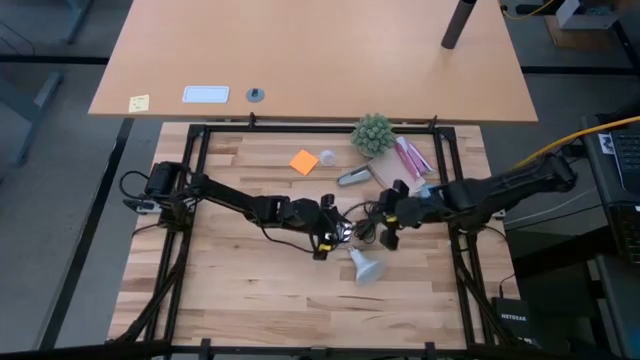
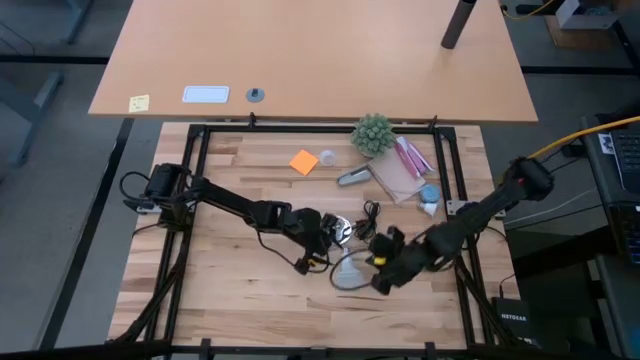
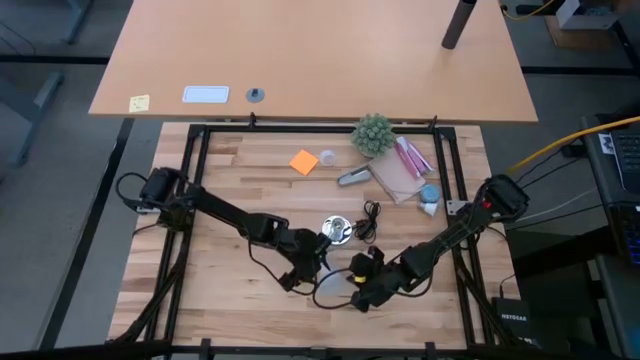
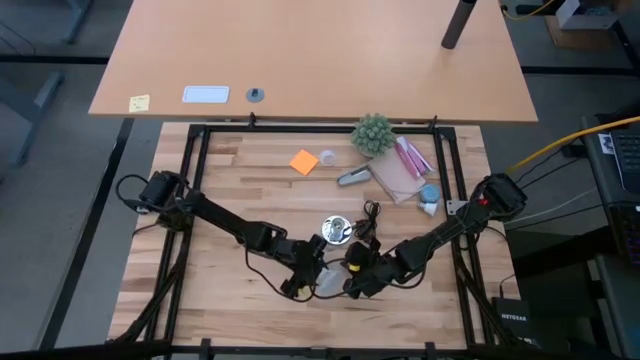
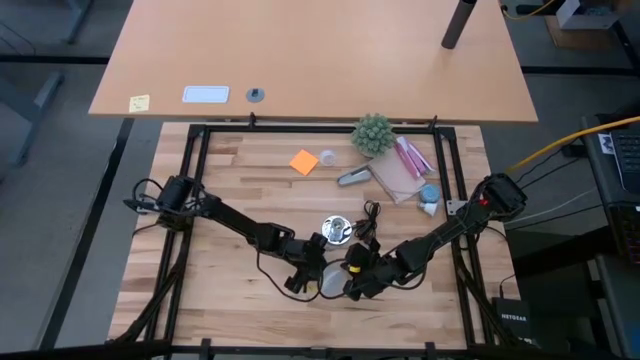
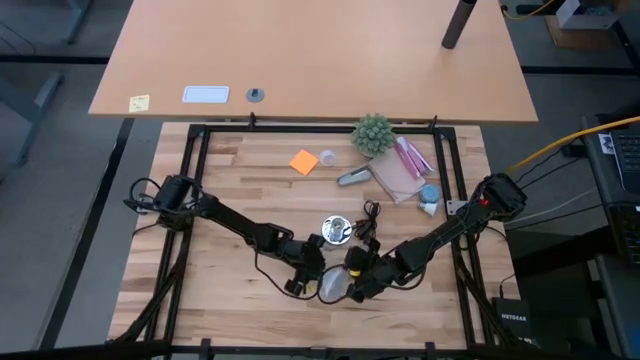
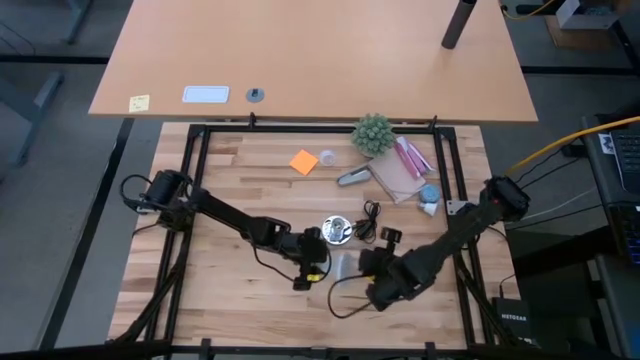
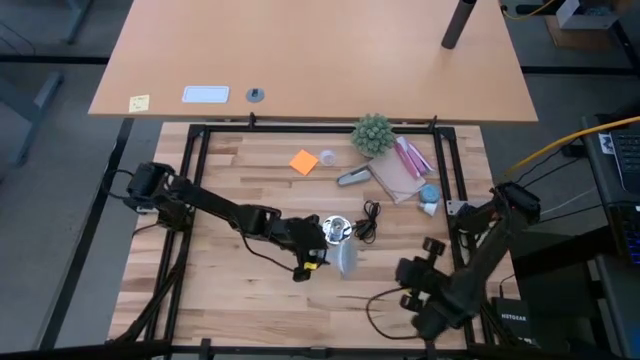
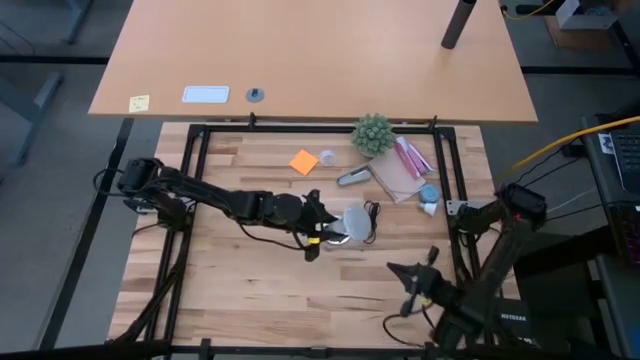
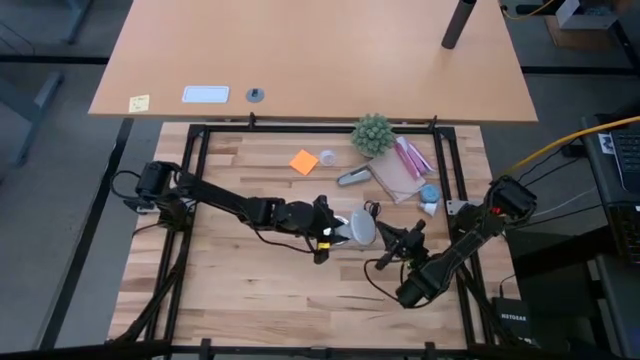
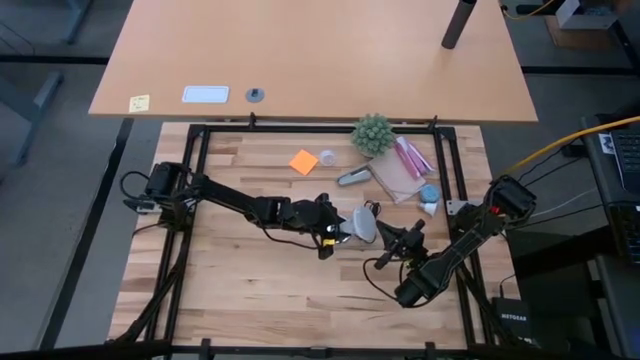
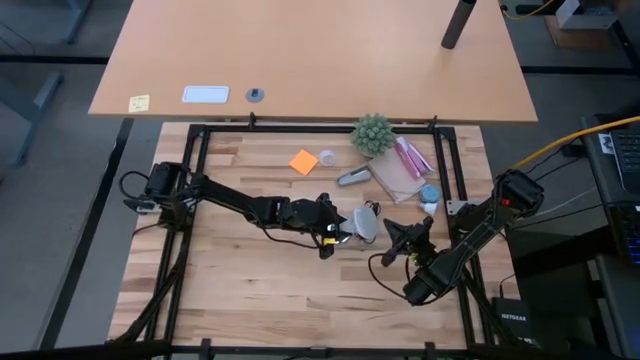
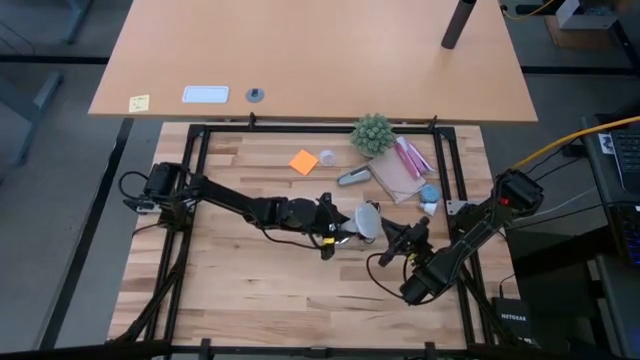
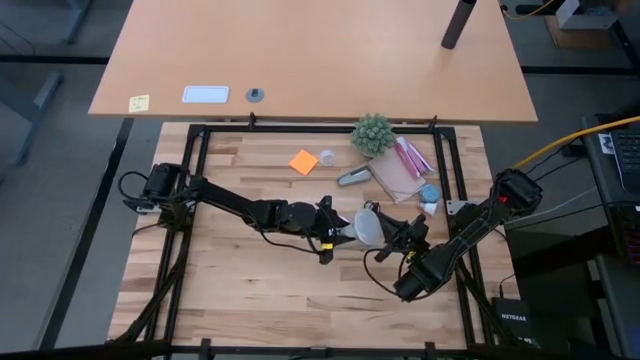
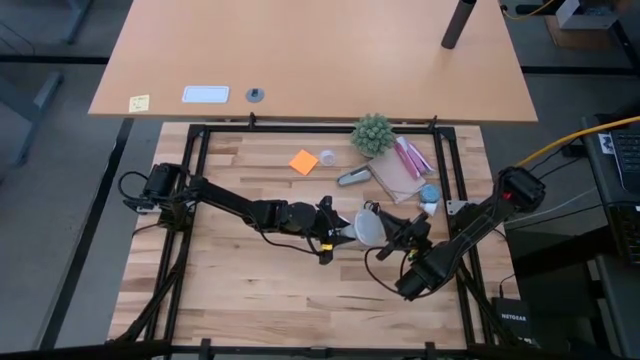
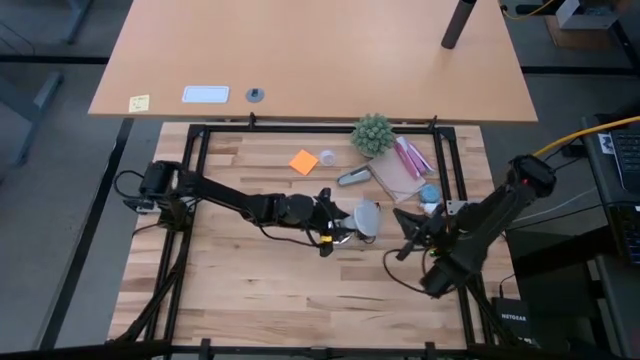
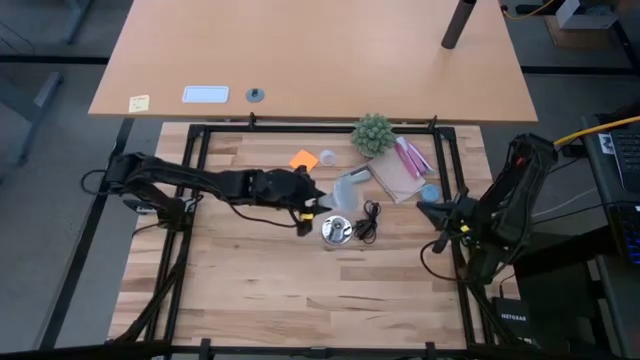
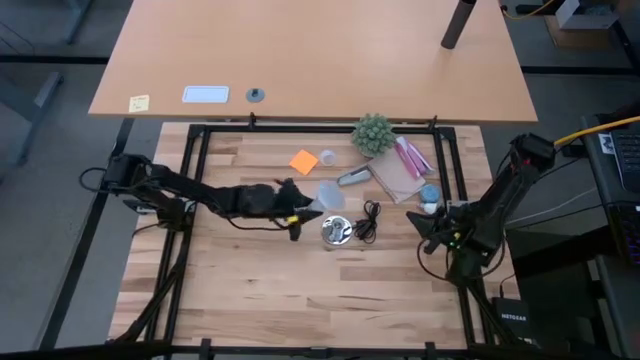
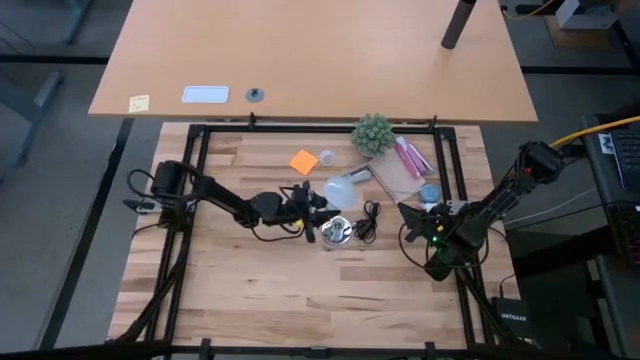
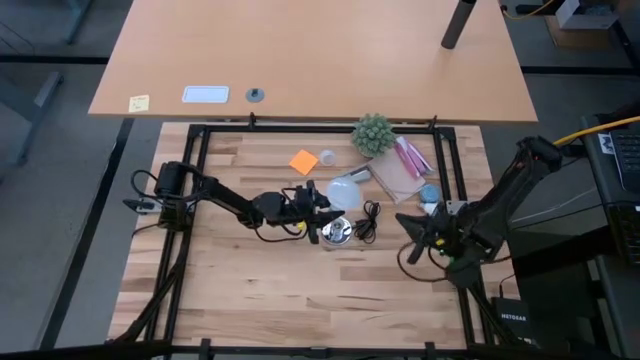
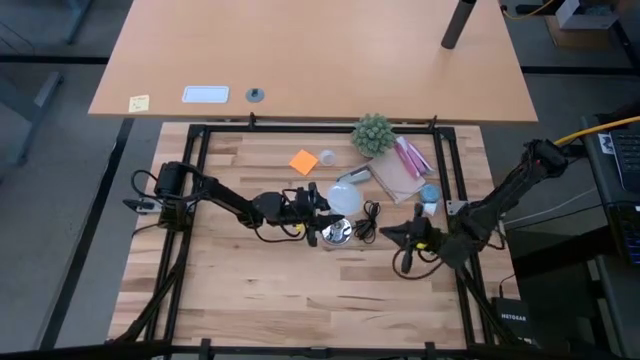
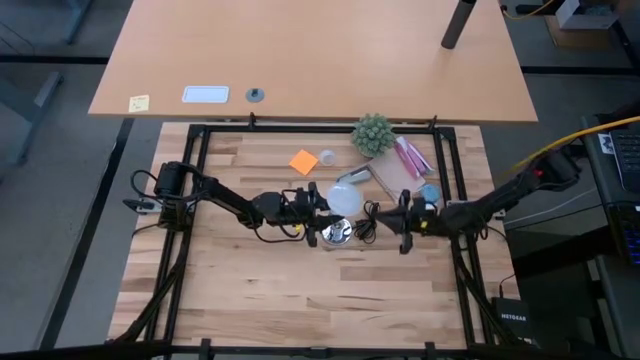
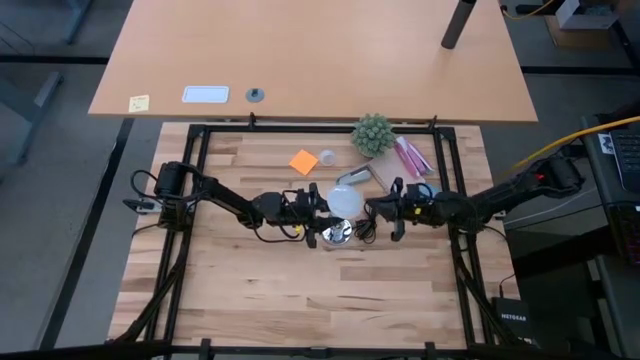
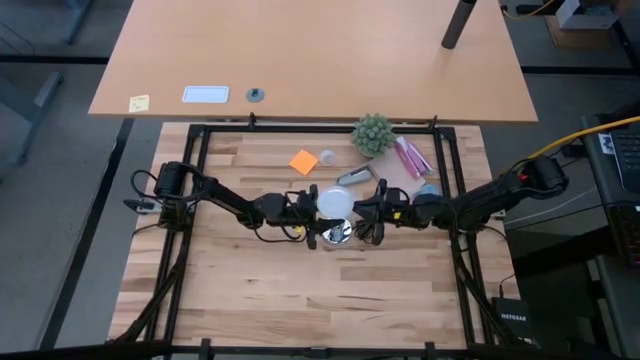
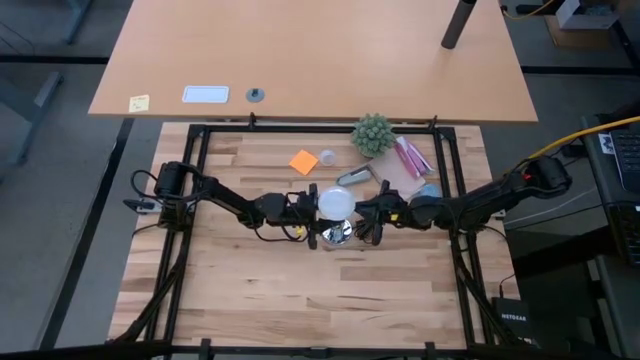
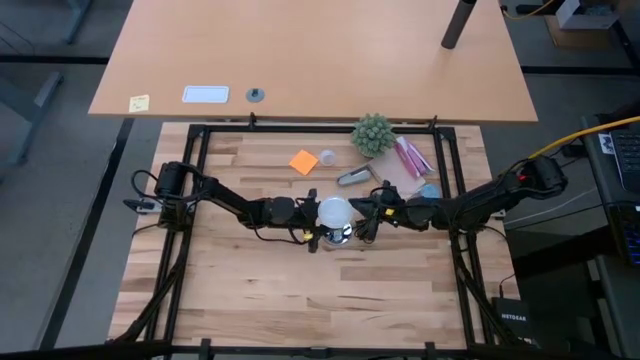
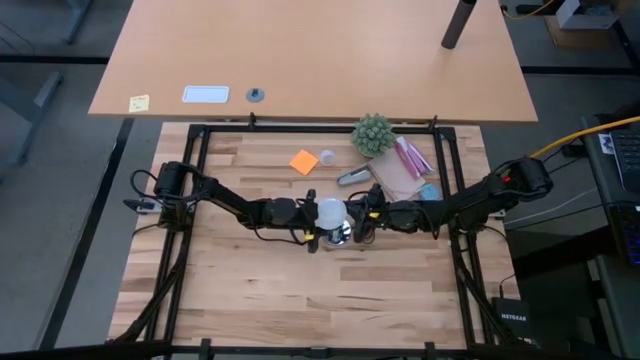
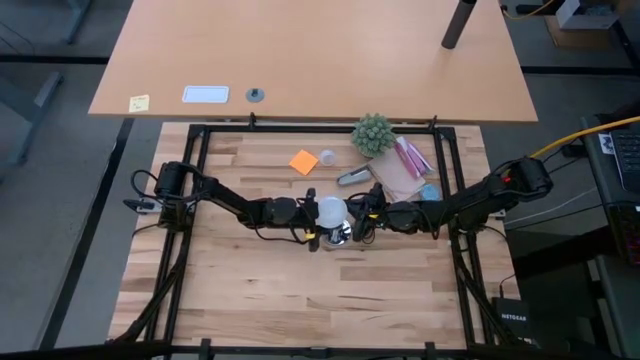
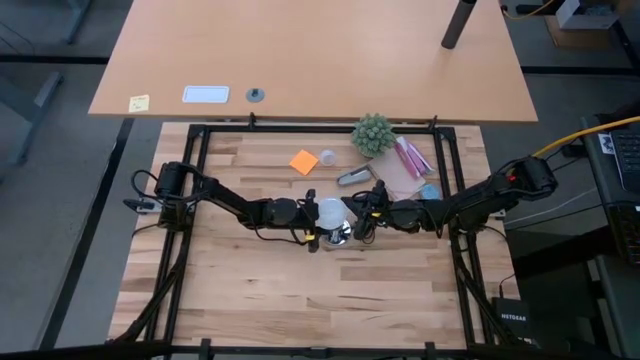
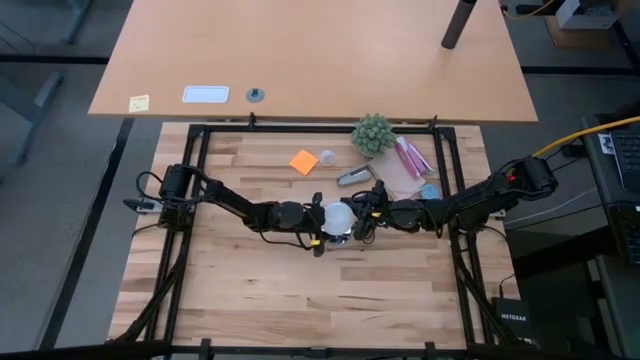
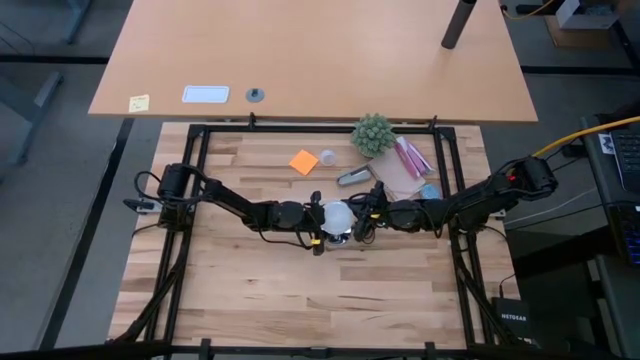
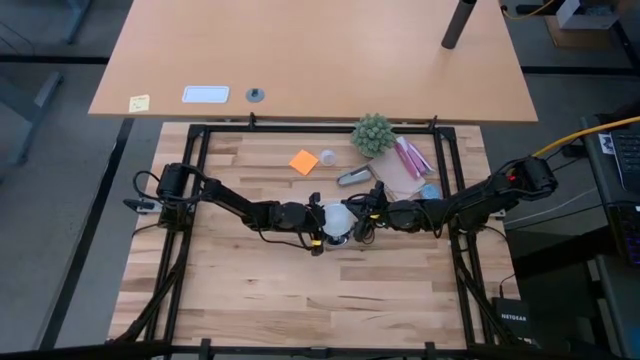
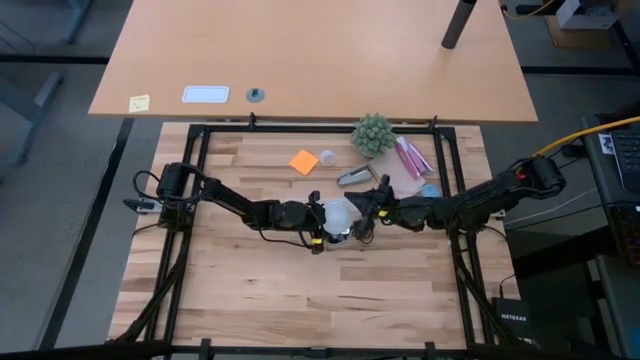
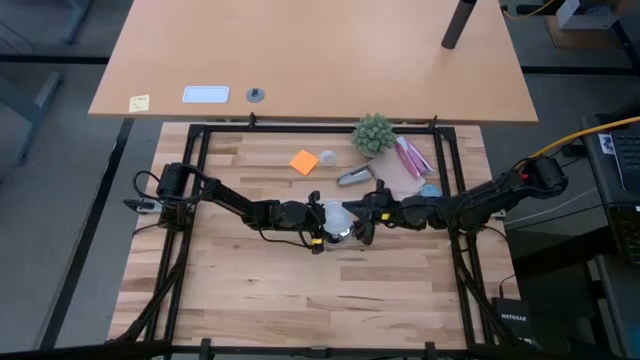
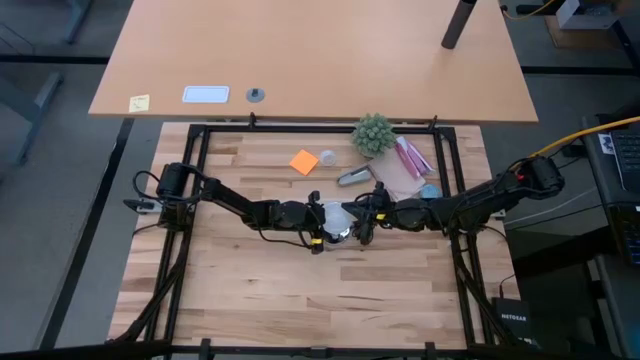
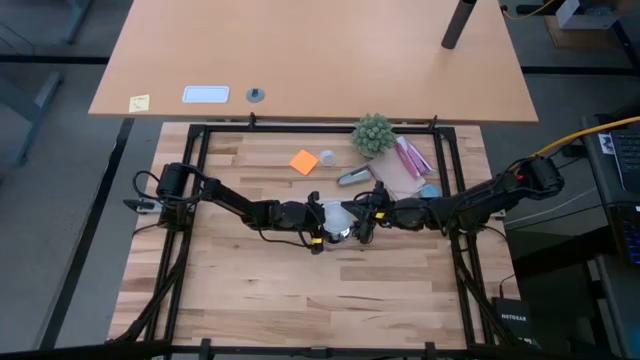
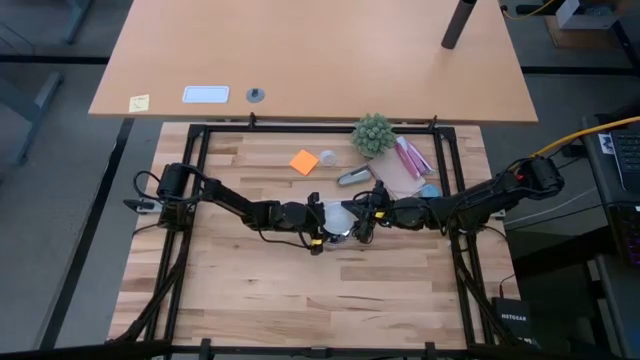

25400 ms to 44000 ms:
Task: Screw lightbulb
Insert the lightbulb in the silver lamp
